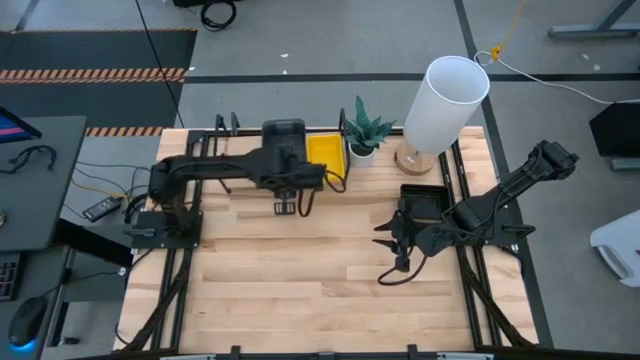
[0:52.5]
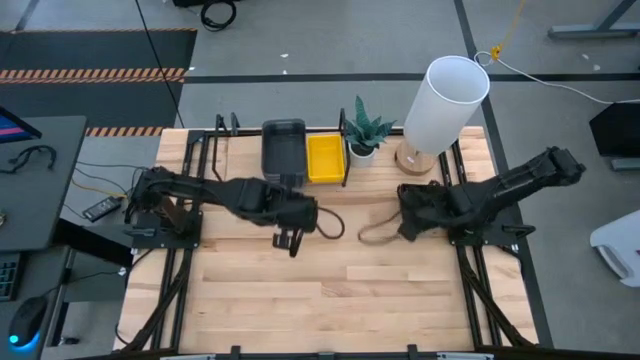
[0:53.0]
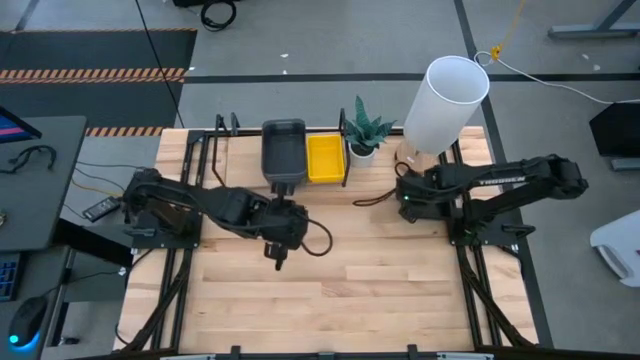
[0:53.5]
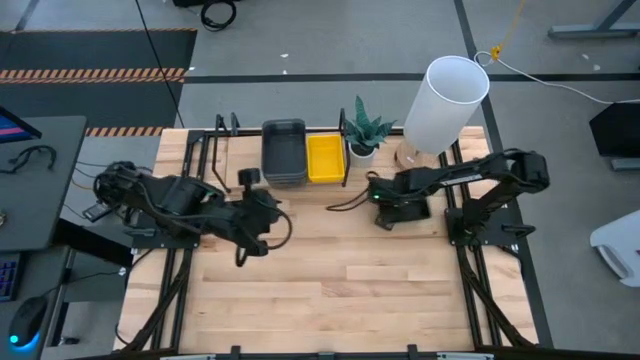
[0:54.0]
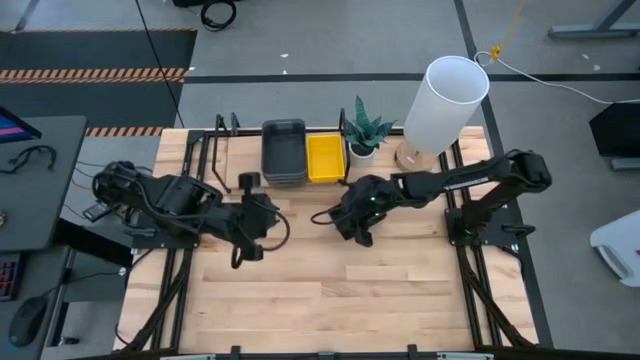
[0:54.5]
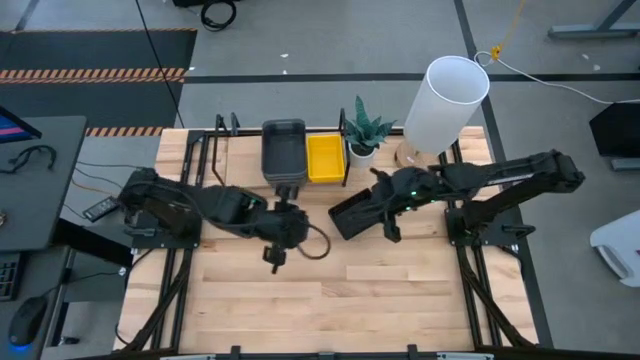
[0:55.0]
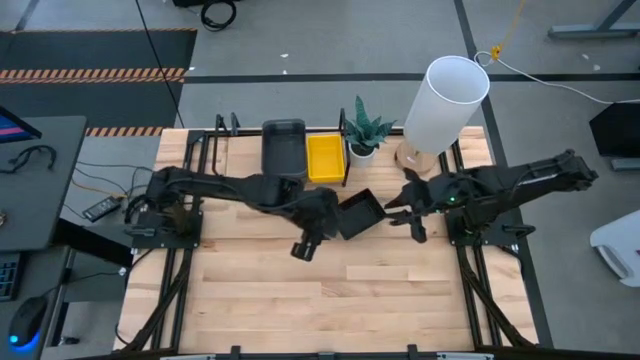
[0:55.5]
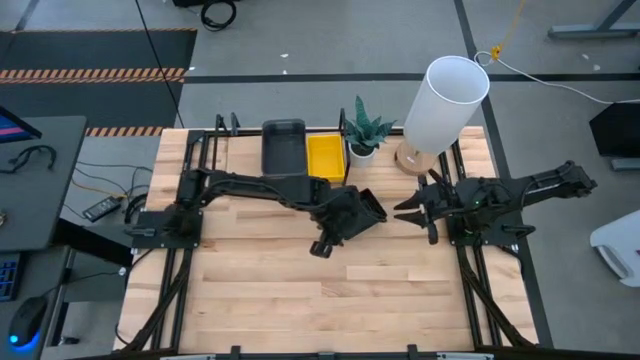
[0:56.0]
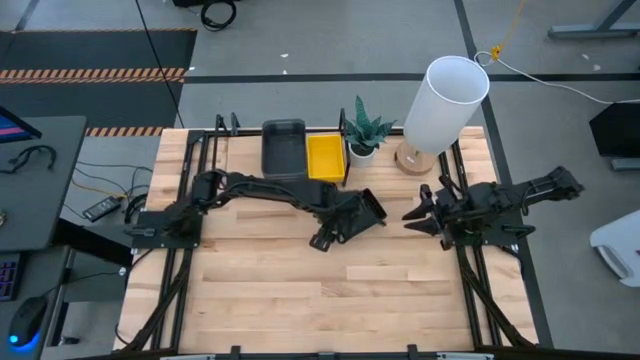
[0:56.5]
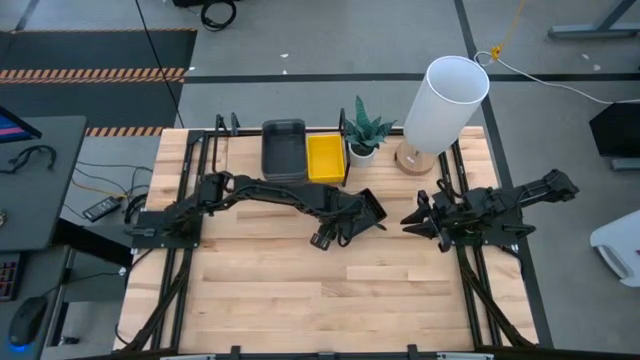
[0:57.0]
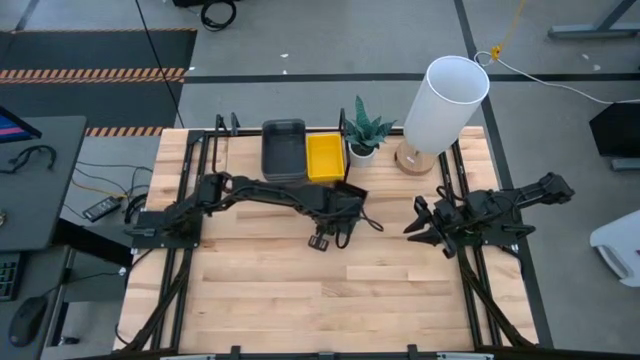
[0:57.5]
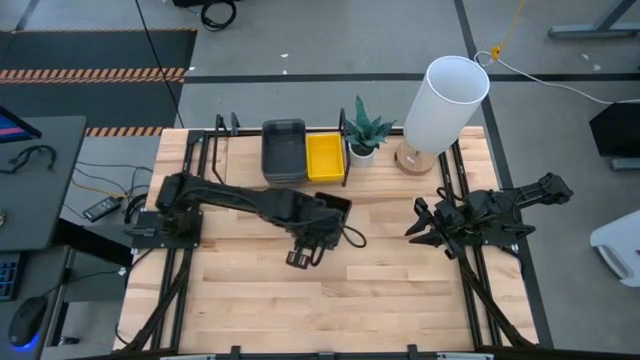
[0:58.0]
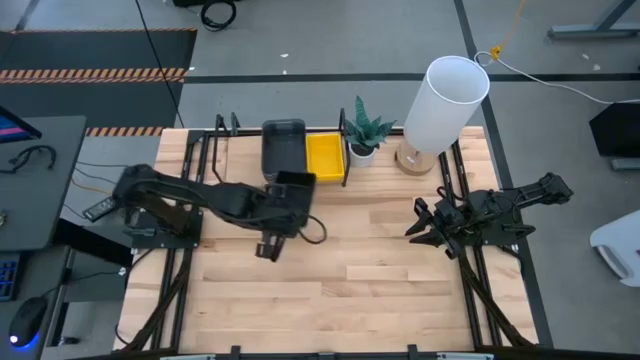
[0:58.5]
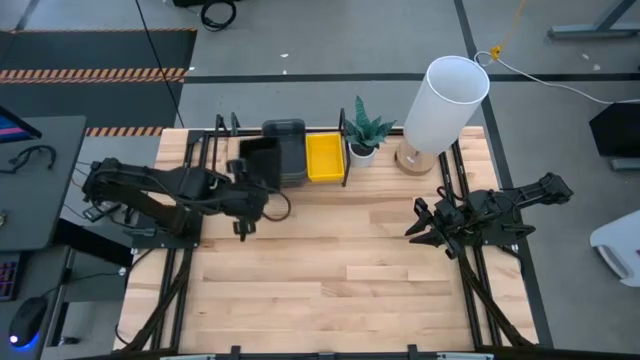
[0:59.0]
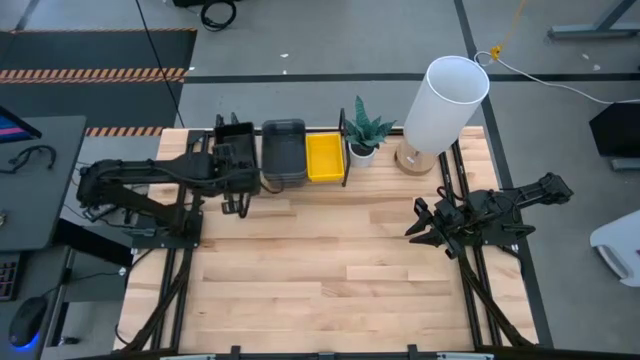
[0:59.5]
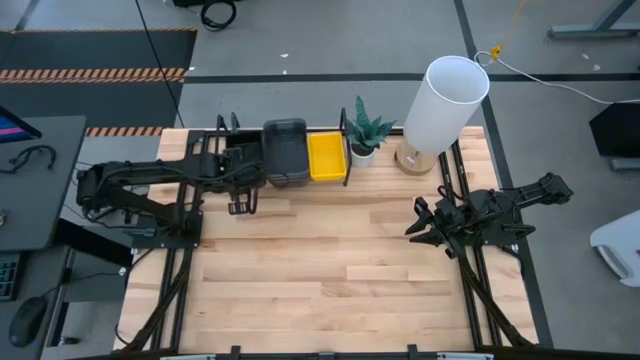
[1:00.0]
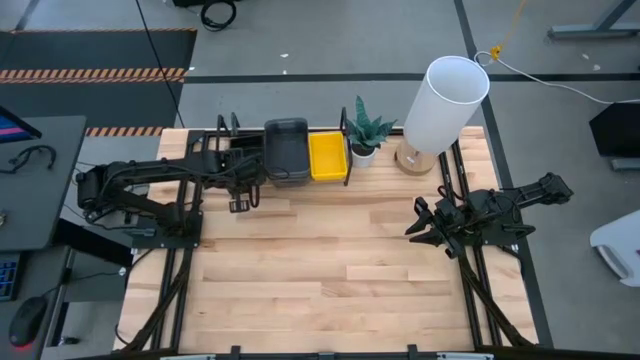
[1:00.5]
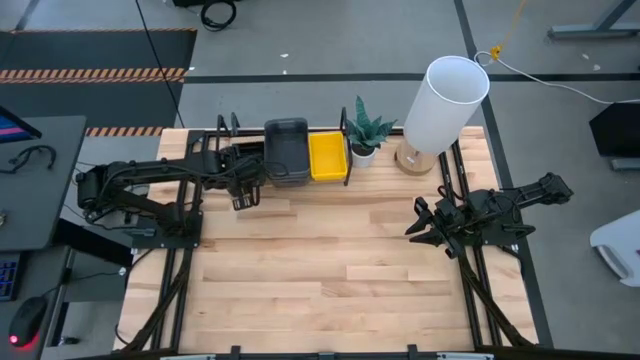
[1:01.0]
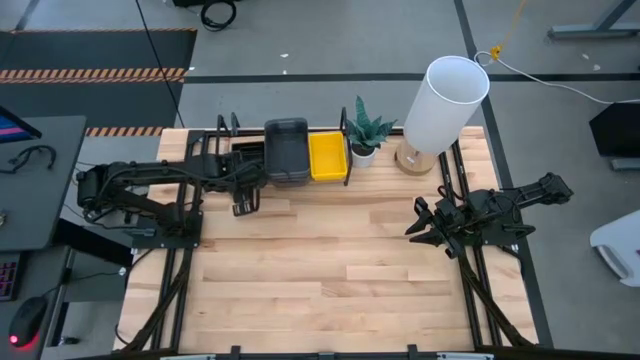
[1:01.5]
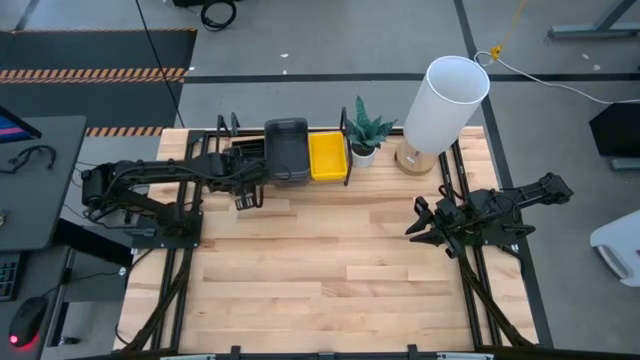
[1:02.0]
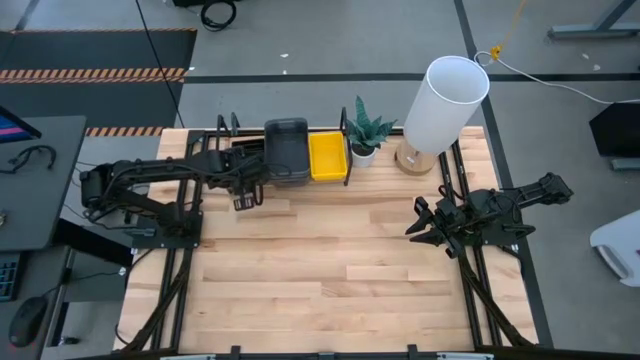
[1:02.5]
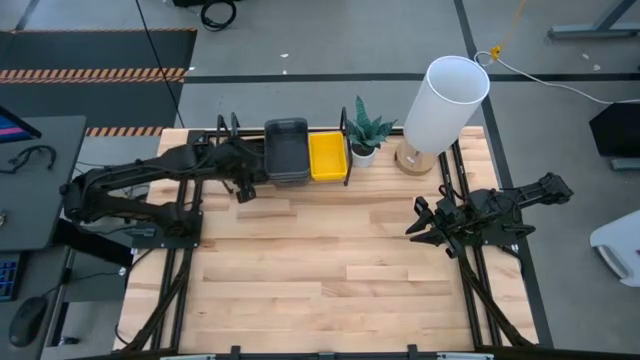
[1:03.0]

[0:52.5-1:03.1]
Task: Stack baskets on shelf by color
Put the black bins on the shelf

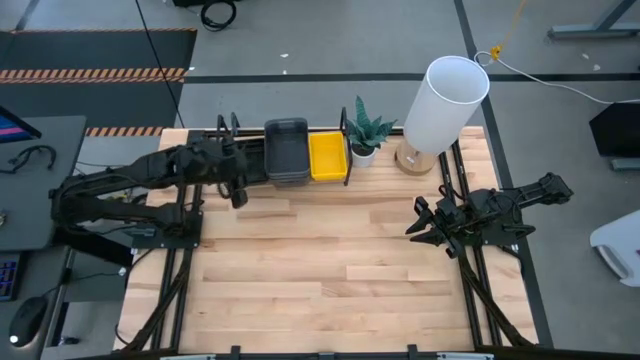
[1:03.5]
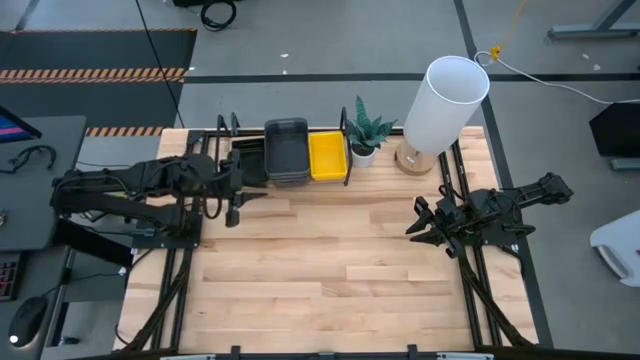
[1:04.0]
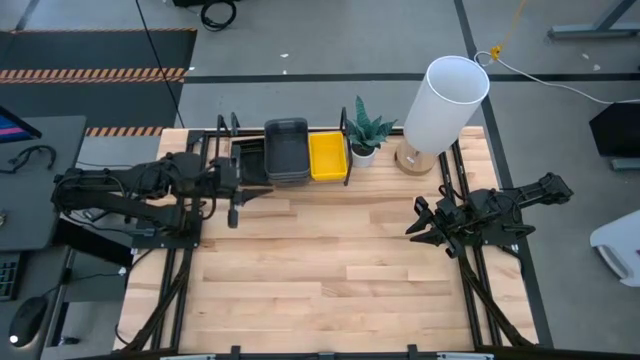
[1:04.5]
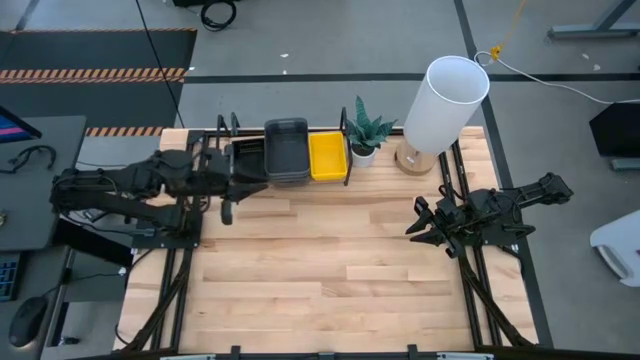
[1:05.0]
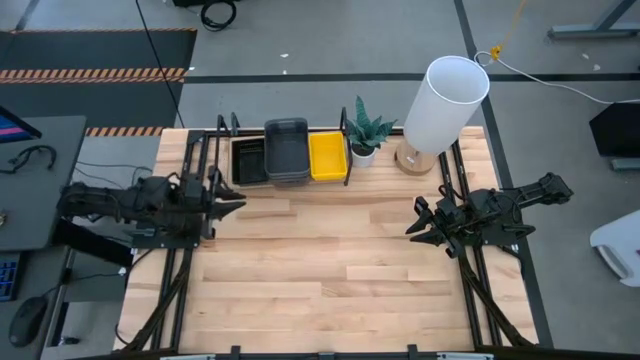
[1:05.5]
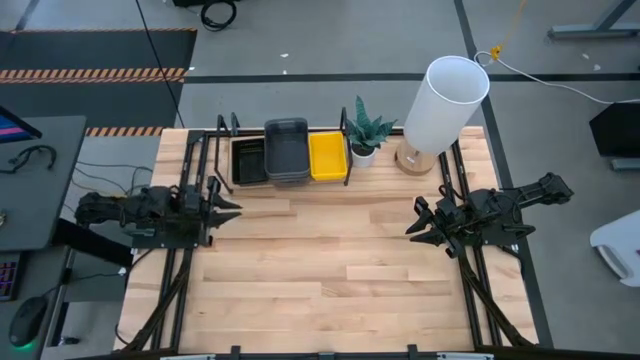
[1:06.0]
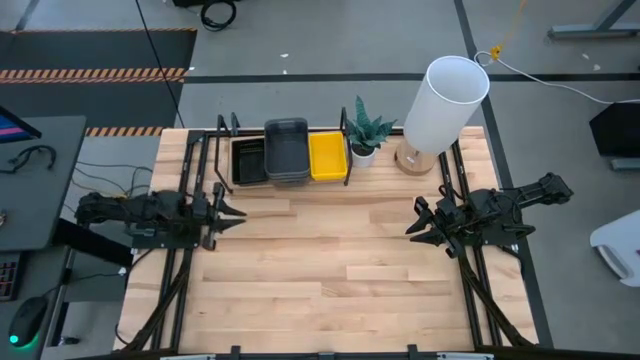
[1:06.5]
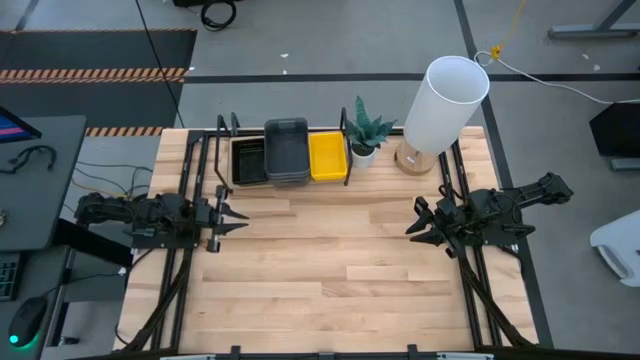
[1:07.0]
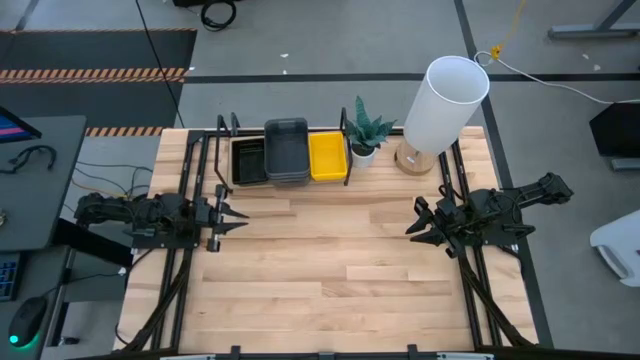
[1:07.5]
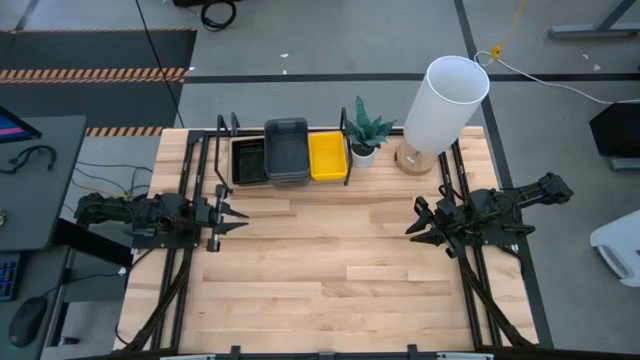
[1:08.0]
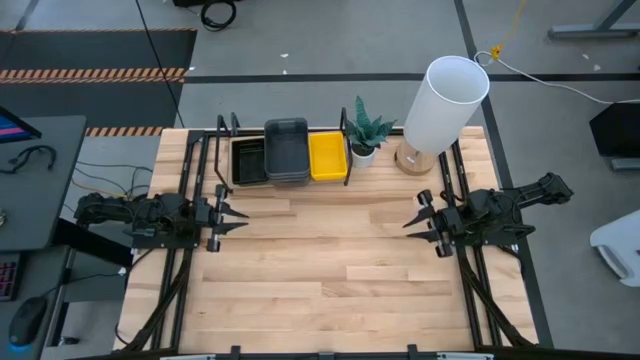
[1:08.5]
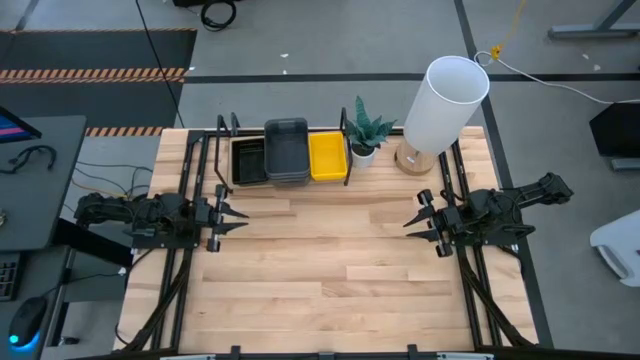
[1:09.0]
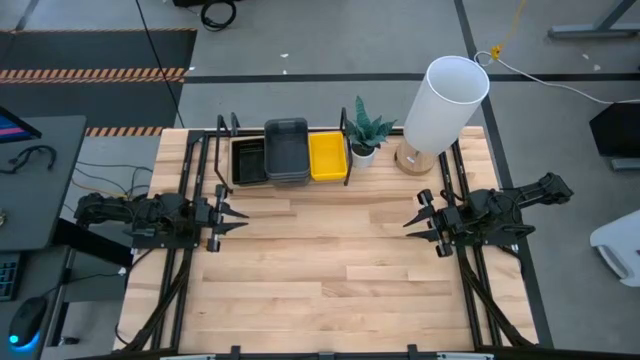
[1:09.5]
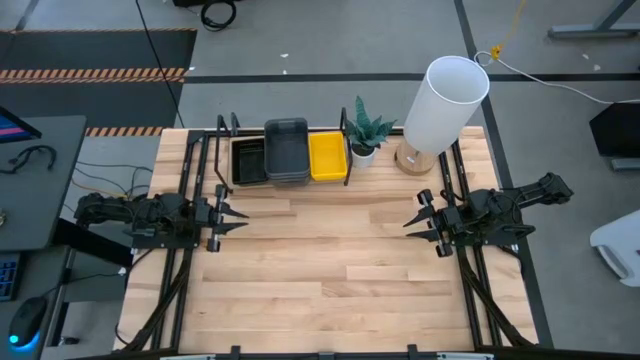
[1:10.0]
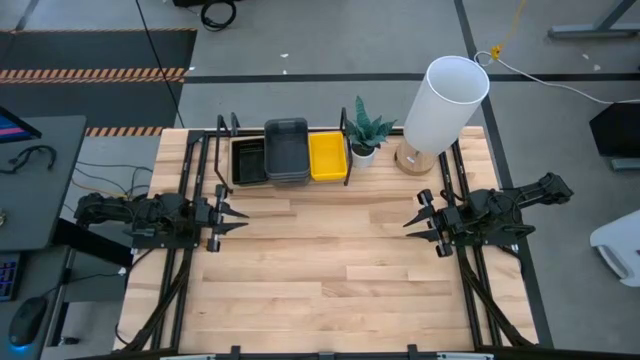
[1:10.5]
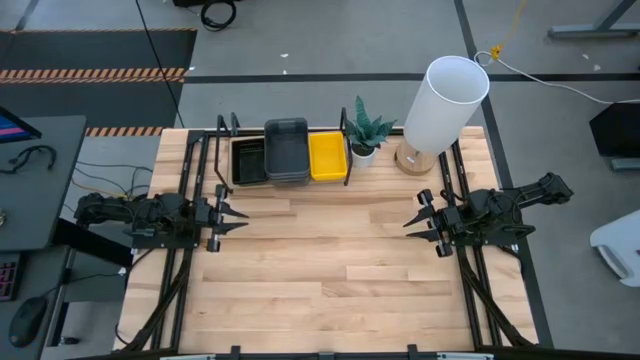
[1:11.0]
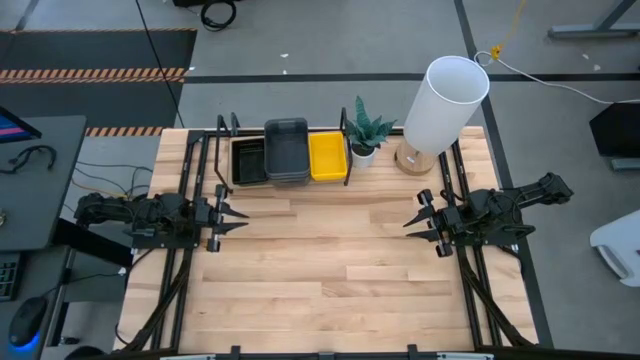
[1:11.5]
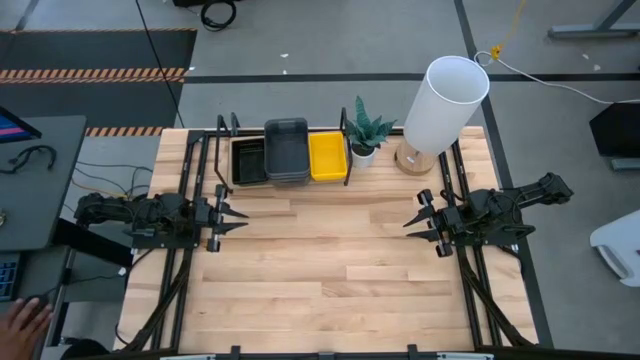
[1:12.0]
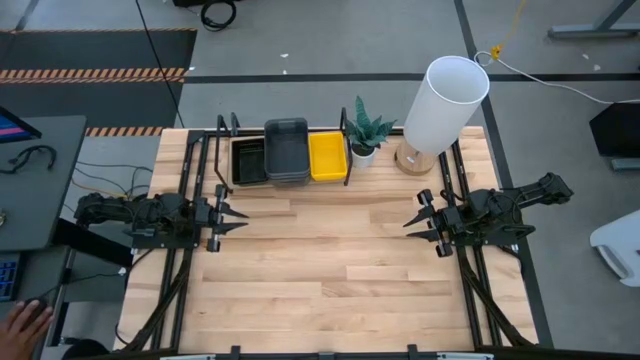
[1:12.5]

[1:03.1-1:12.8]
Return to Home Position
